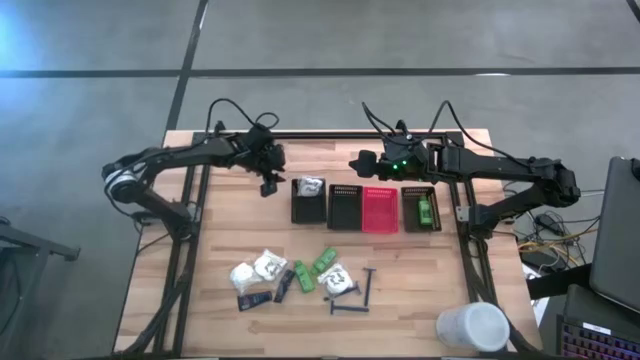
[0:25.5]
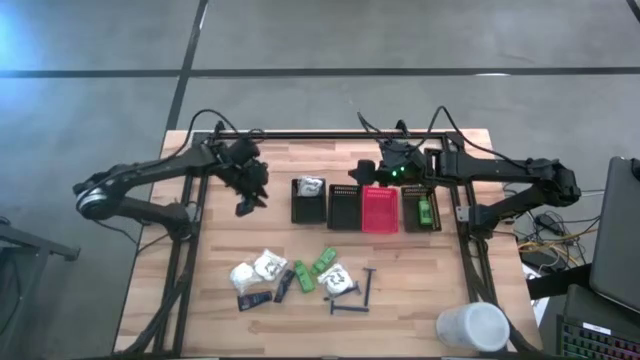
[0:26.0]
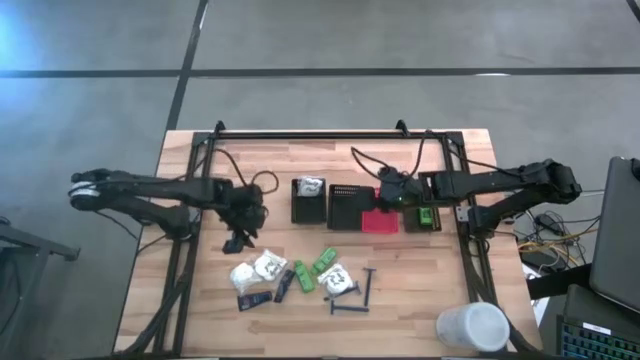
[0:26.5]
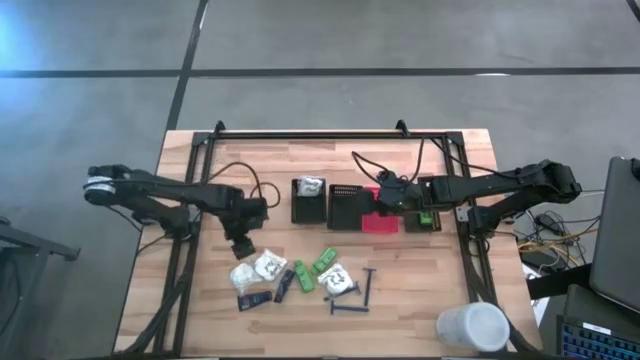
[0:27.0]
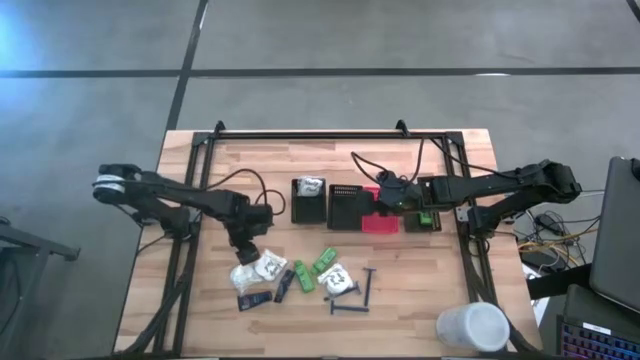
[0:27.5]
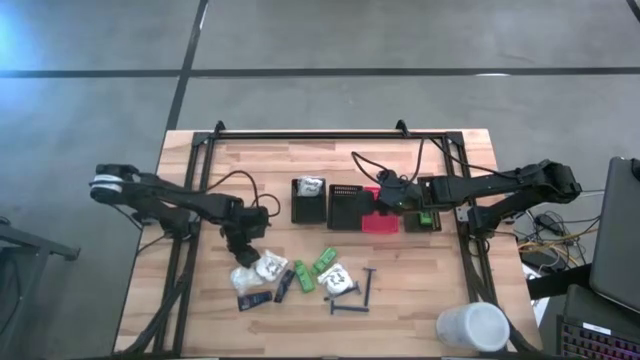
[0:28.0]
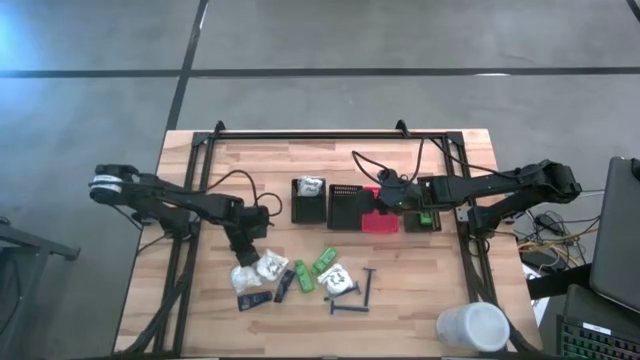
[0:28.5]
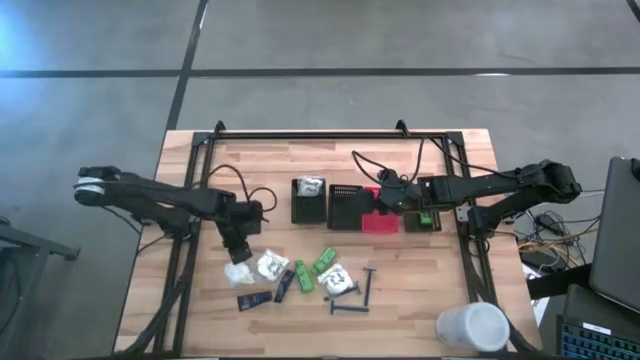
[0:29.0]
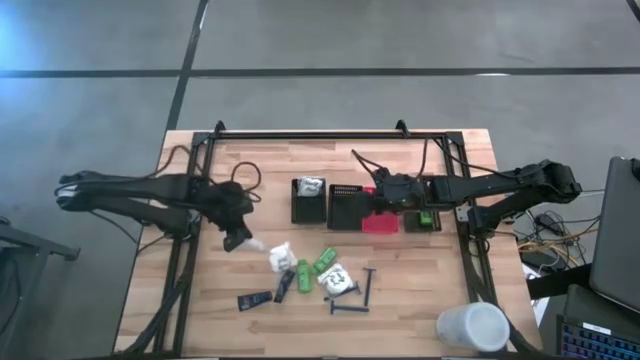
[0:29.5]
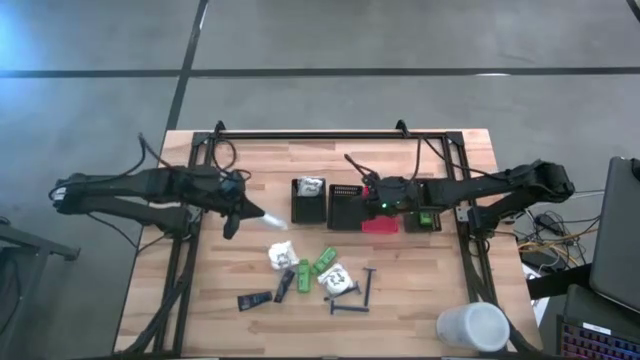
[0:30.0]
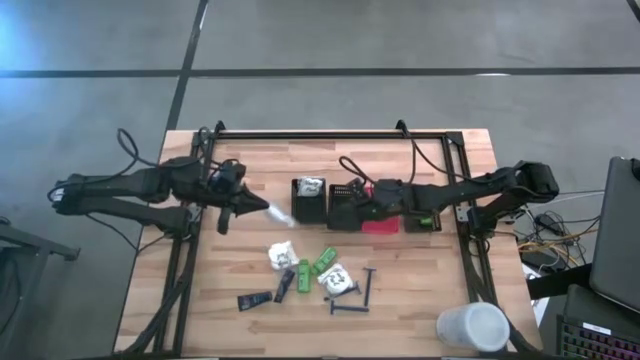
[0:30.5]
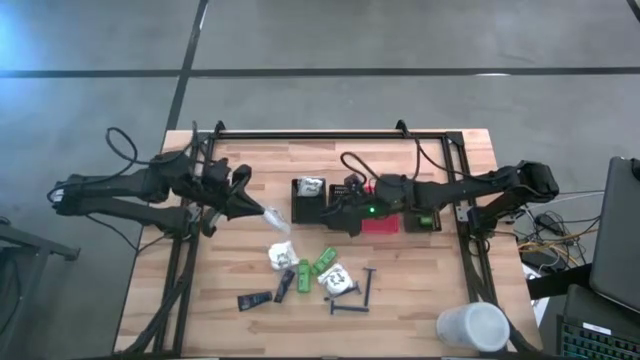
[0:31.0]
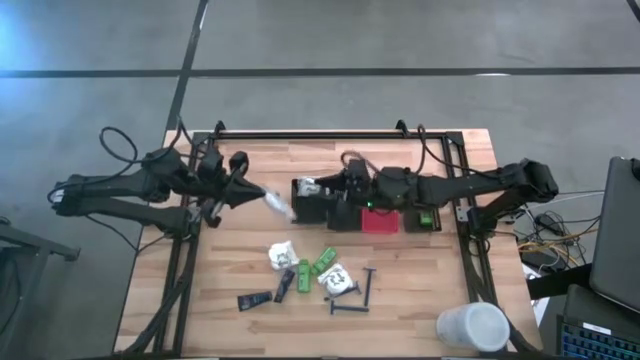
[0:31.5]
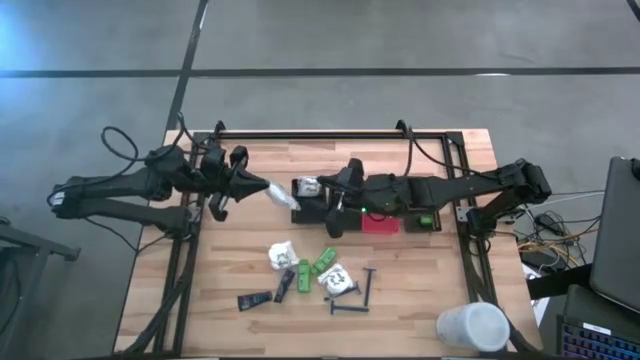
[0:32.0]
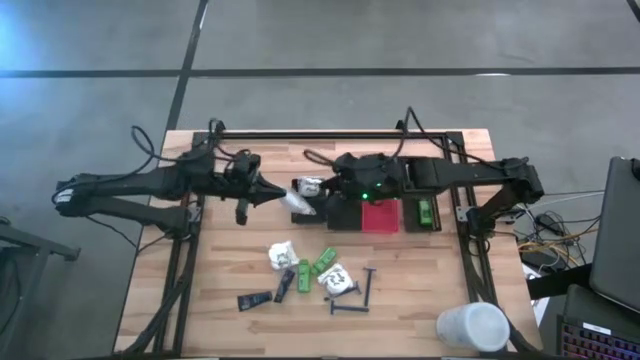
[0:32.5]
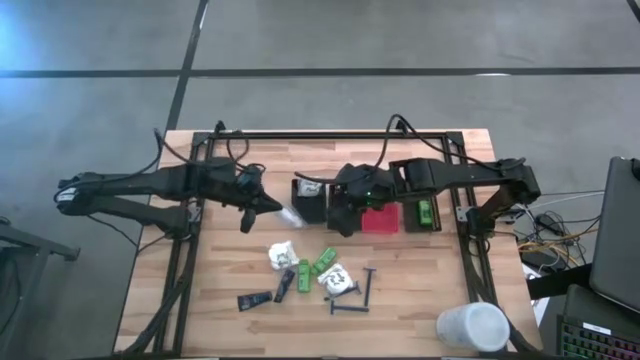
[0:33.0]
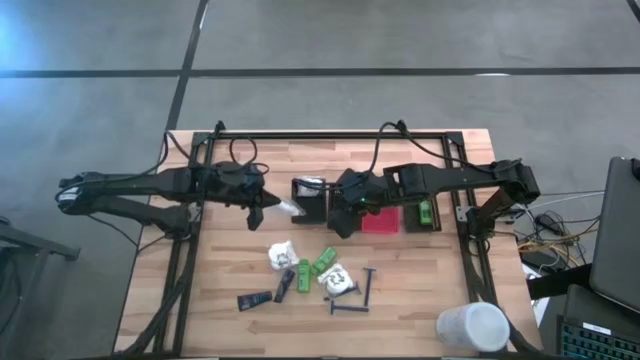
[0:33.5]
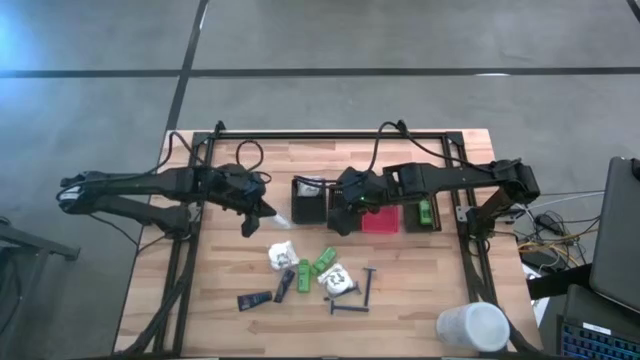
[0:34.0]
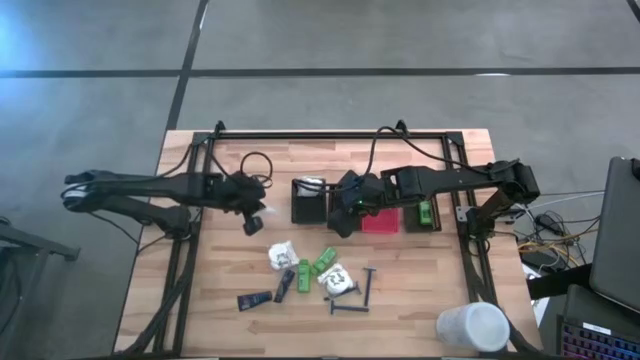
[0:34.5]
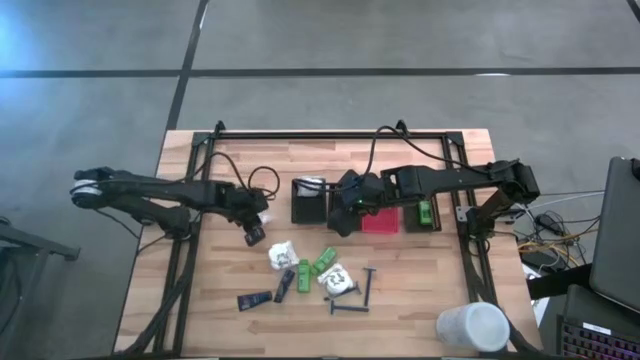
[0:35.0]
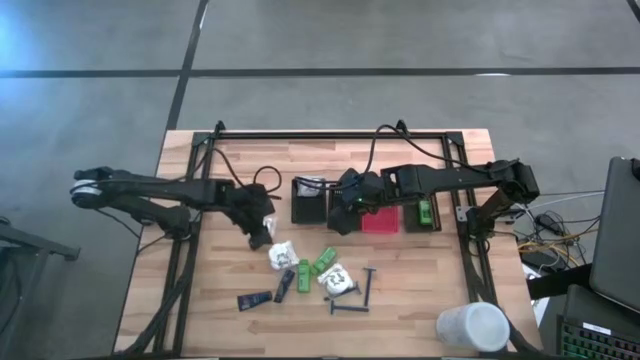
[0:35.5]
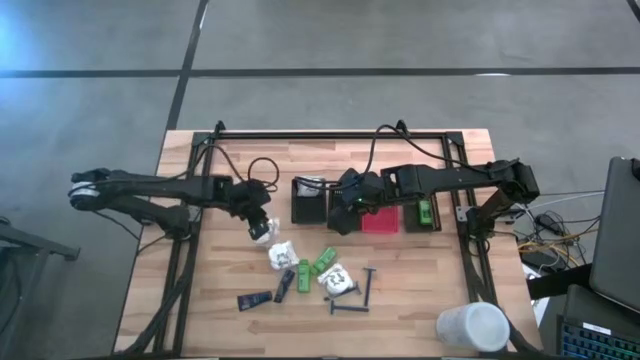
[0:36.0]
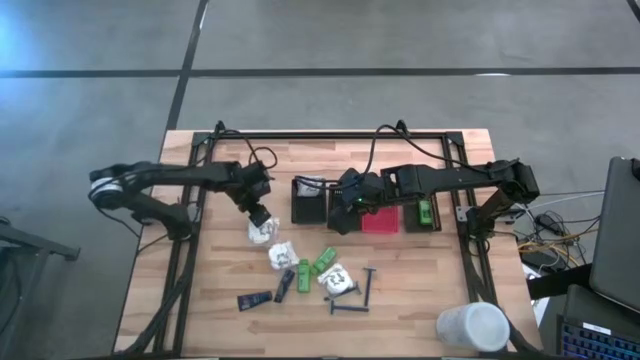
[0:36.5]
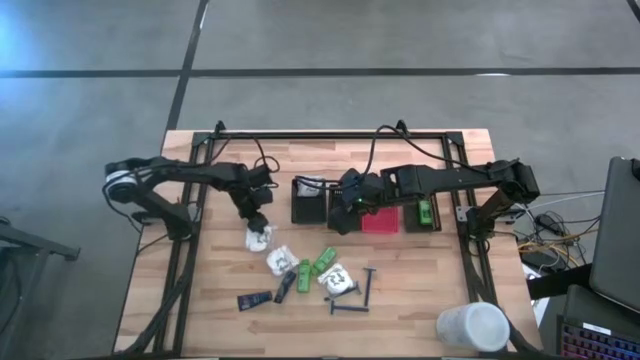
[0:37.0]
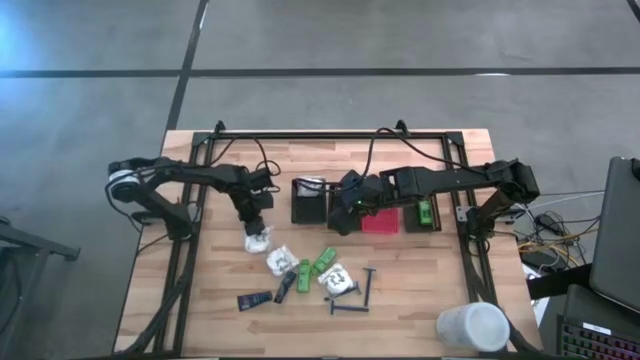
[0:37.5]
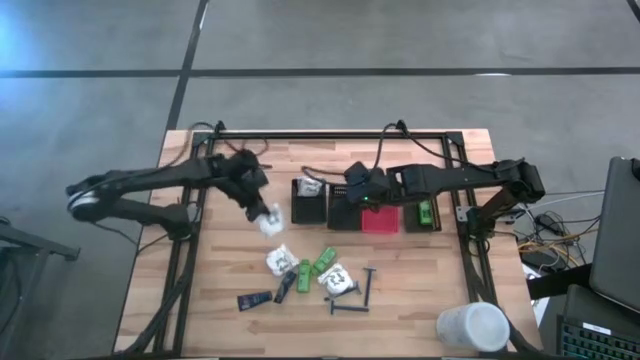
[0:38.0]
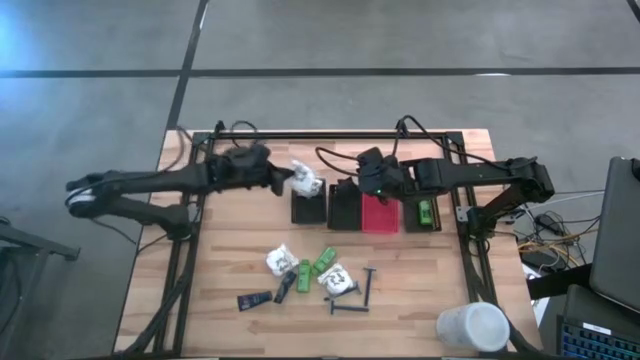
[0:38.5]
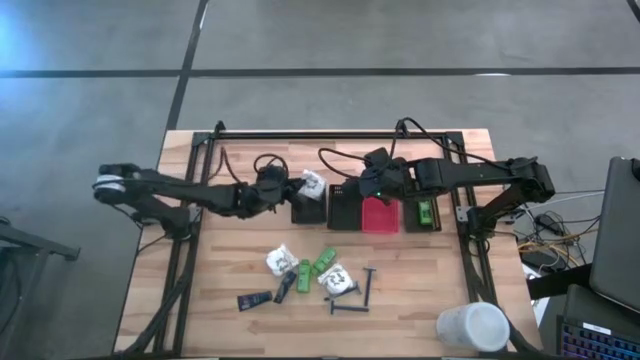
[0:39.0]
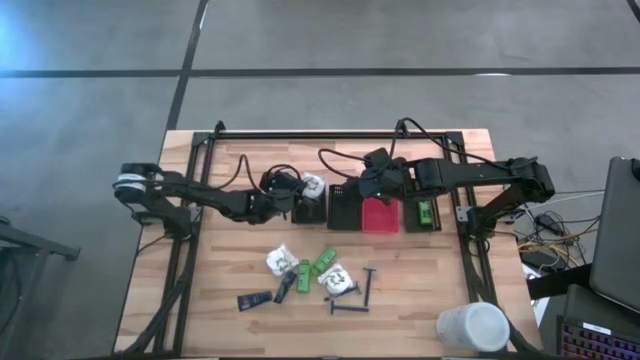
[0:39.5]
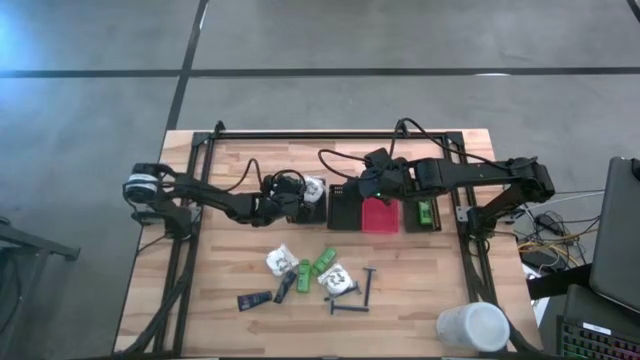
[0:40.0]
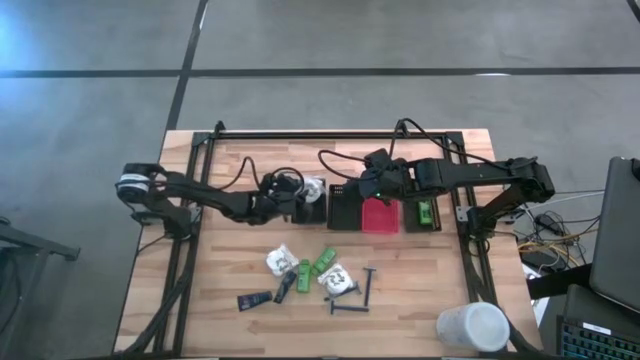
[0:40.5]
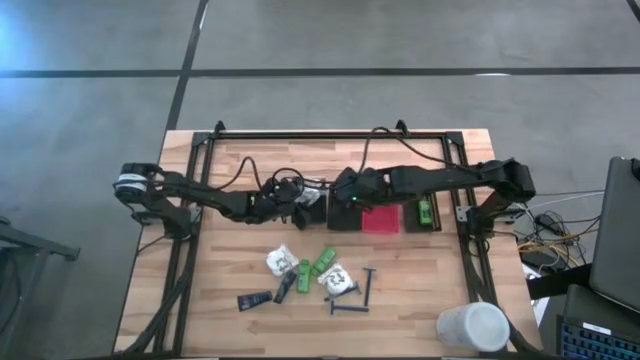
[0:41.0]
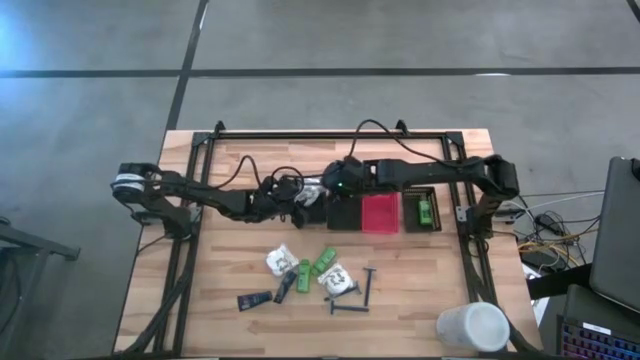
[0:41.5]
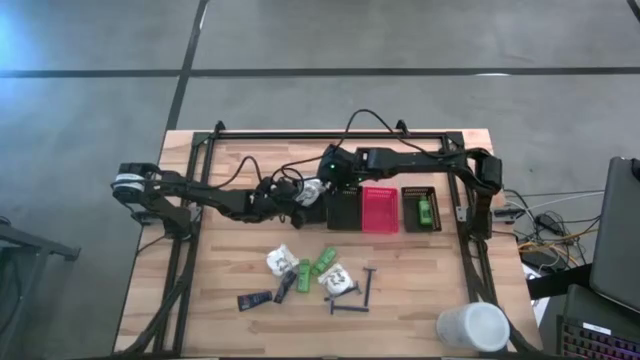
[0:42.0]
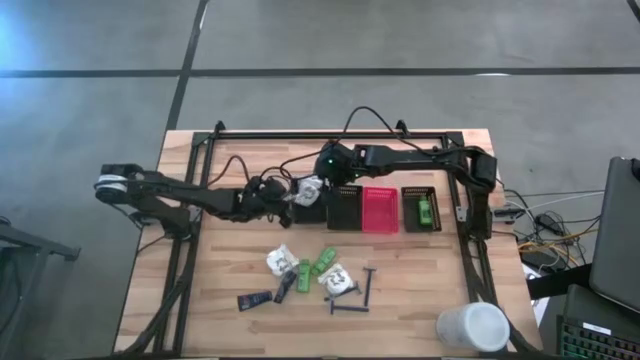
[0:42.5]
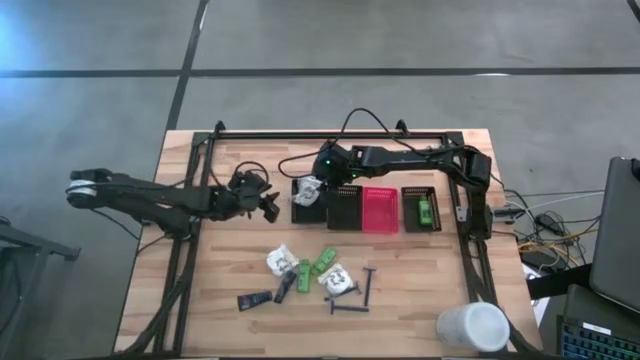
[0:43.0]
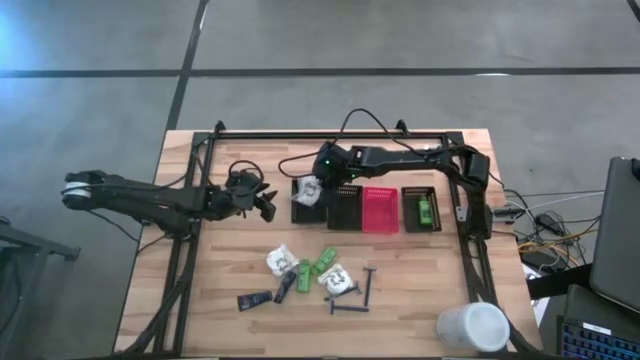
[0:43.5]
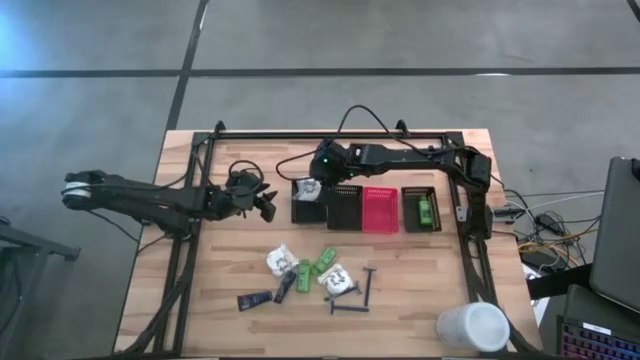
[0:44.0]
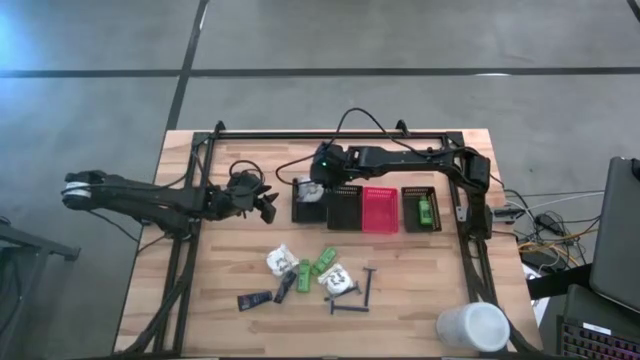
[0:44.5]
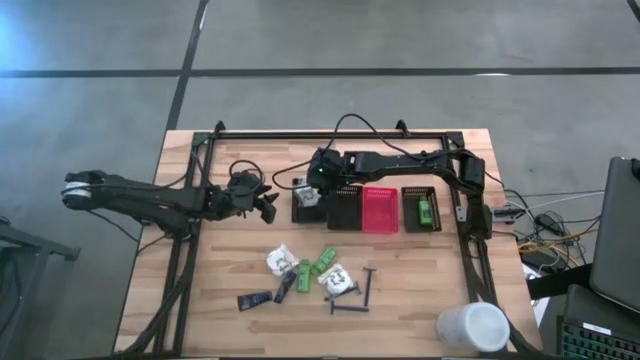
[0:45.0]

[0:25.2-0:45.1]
Task: Pick & Place Travel size toiletries
Put the white cotton pack into the left black bin

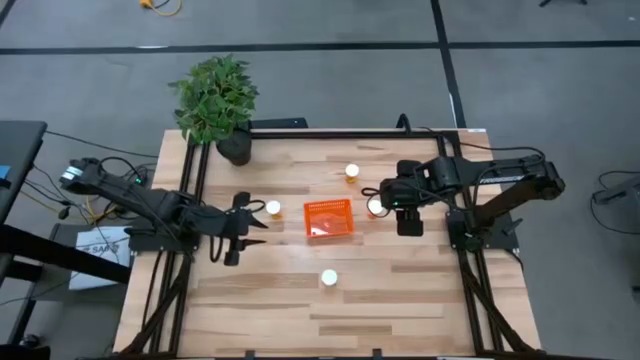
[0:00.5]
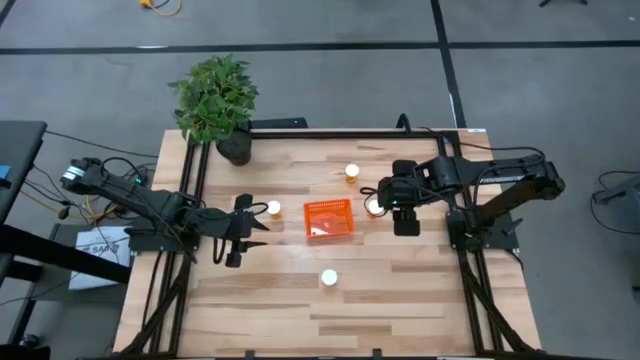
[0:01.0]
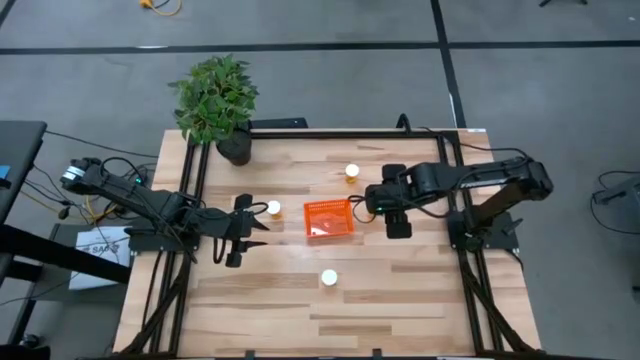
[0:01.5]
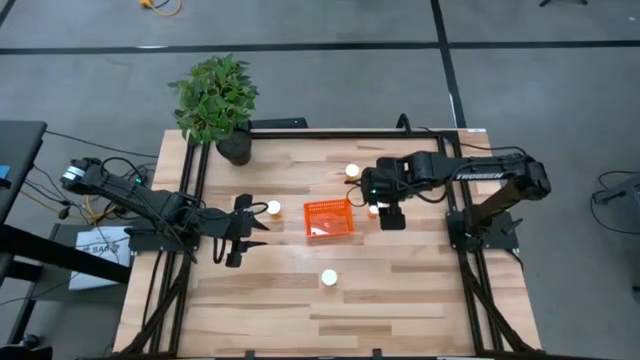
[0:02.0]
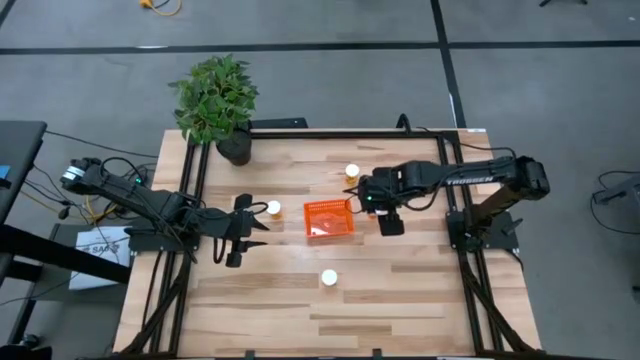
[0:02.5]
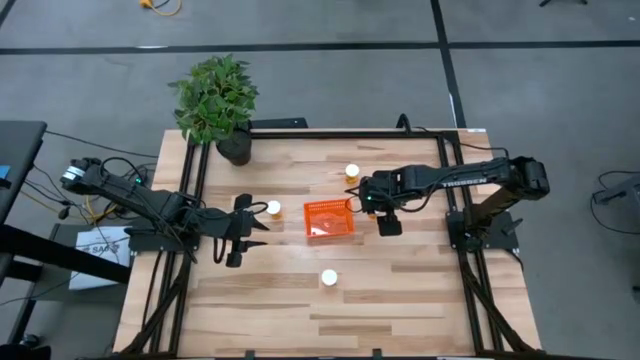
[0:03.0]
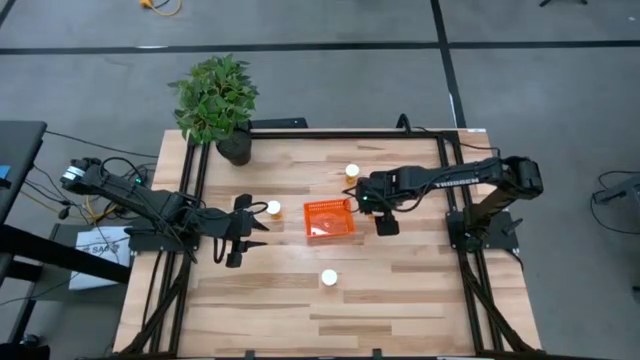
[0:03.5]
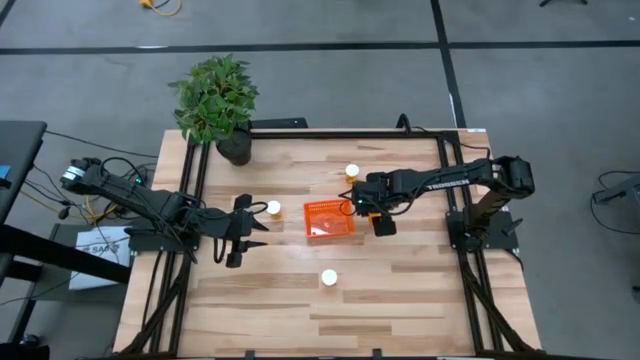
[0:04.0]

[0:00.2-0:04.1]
Task: Pick and place pill bottles into a basket
Put the orange pill bottle into the orange bin
